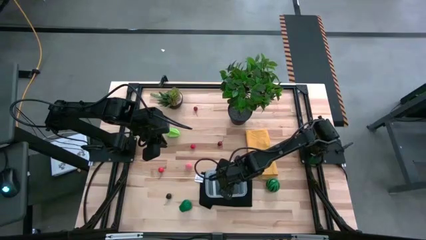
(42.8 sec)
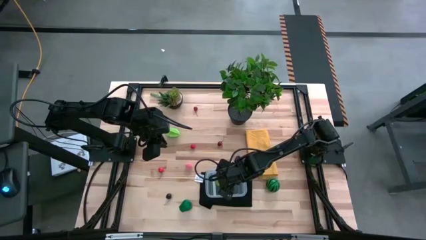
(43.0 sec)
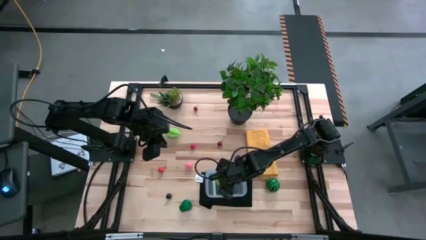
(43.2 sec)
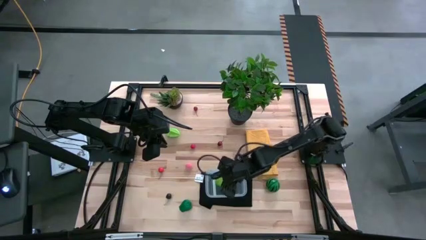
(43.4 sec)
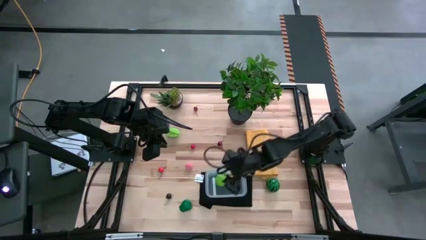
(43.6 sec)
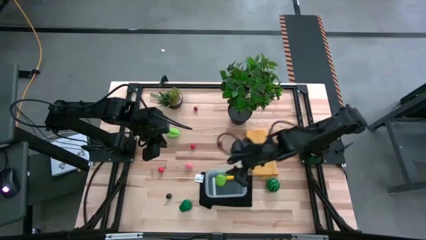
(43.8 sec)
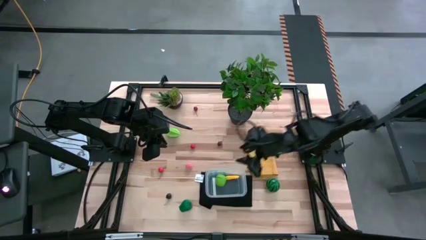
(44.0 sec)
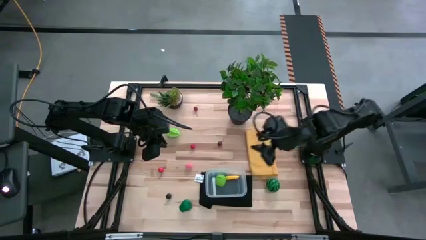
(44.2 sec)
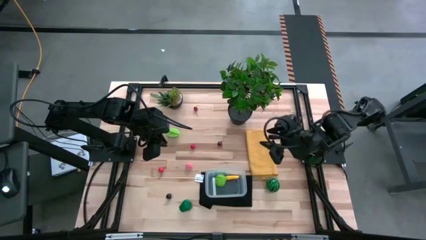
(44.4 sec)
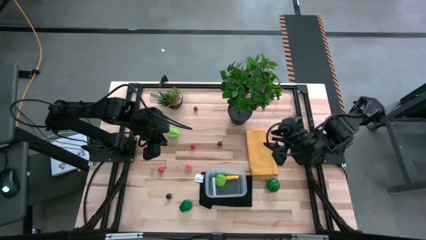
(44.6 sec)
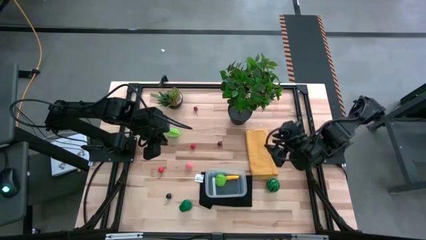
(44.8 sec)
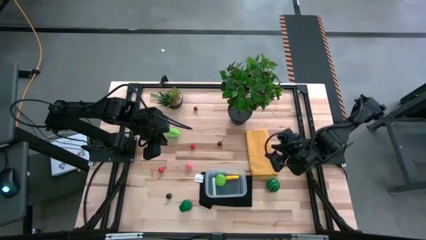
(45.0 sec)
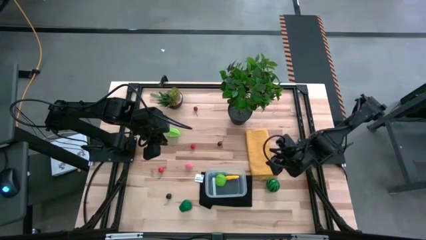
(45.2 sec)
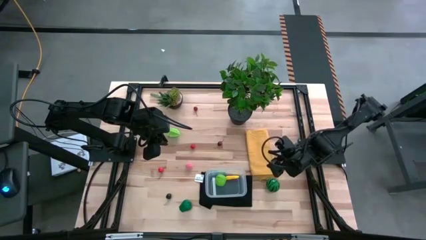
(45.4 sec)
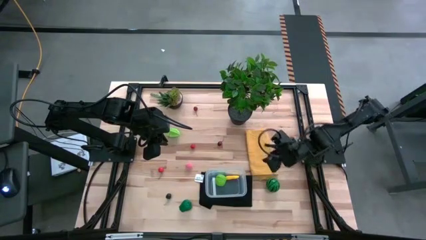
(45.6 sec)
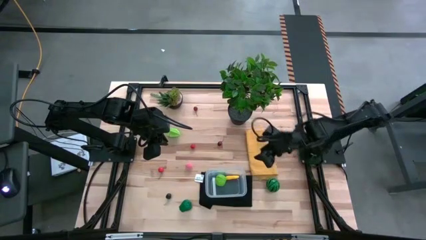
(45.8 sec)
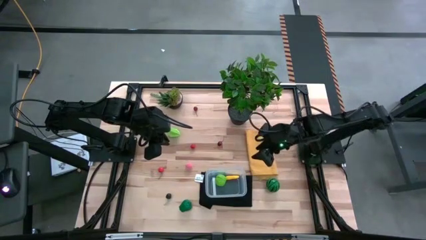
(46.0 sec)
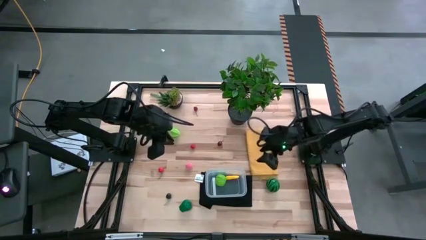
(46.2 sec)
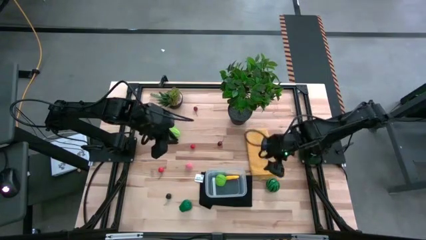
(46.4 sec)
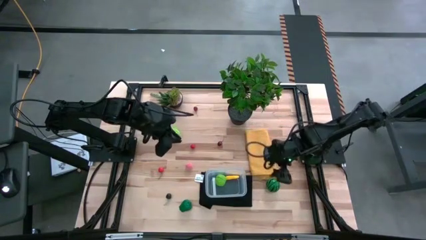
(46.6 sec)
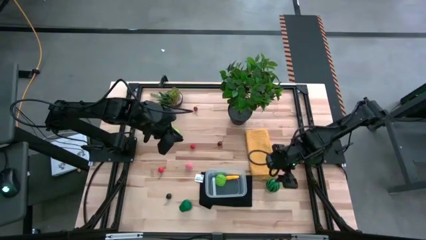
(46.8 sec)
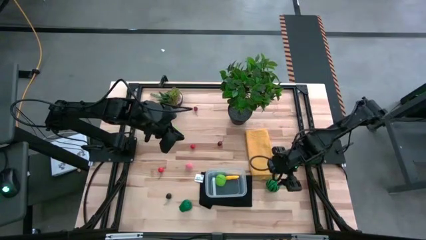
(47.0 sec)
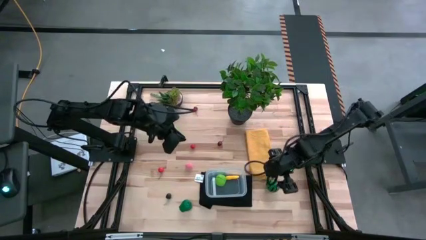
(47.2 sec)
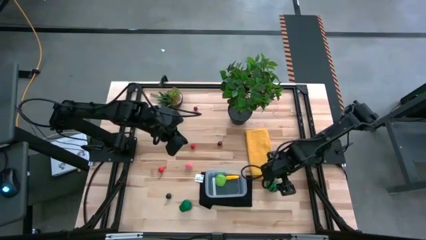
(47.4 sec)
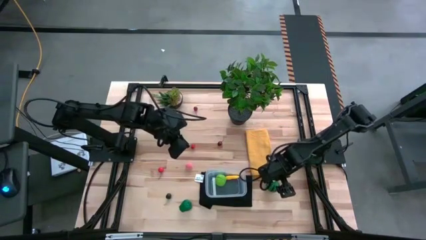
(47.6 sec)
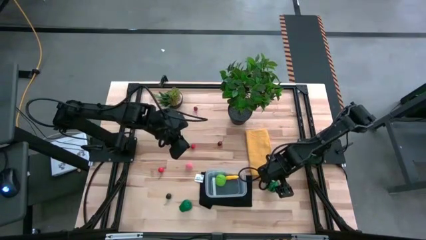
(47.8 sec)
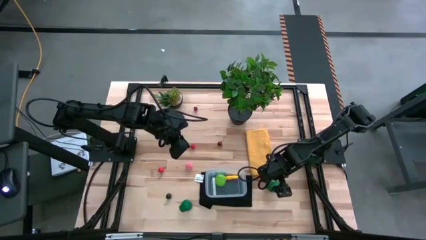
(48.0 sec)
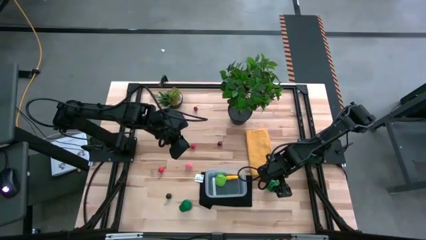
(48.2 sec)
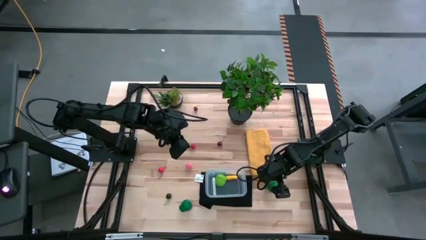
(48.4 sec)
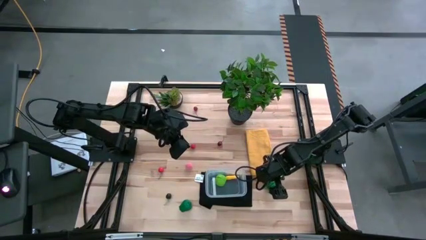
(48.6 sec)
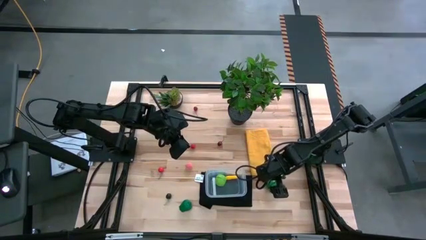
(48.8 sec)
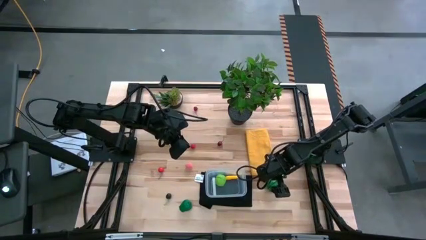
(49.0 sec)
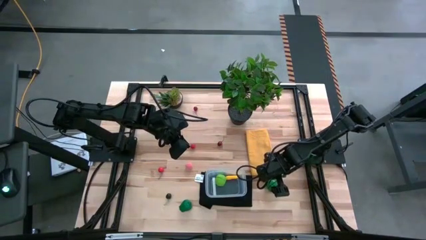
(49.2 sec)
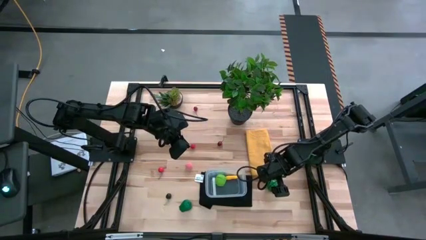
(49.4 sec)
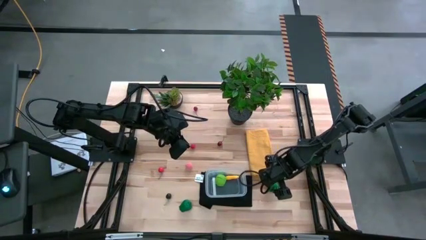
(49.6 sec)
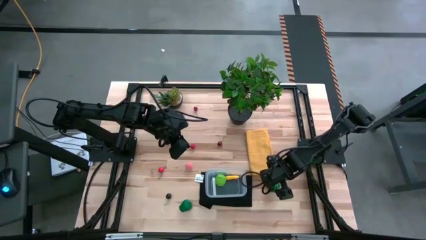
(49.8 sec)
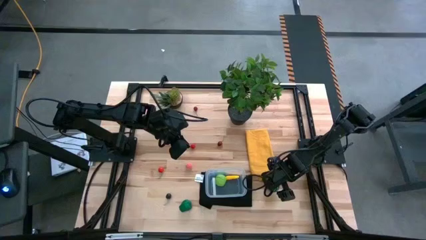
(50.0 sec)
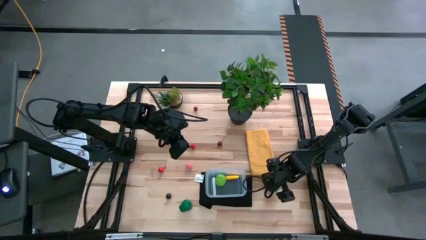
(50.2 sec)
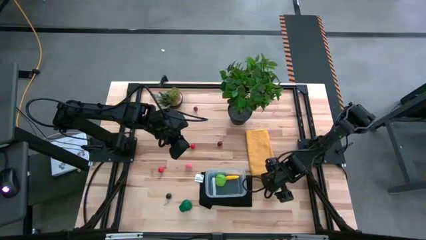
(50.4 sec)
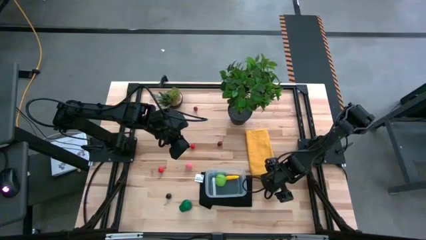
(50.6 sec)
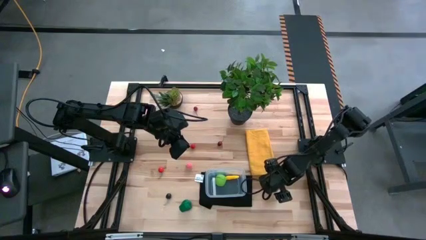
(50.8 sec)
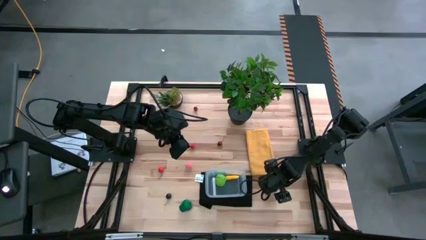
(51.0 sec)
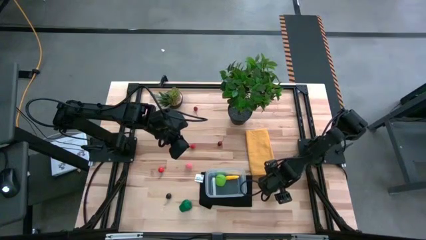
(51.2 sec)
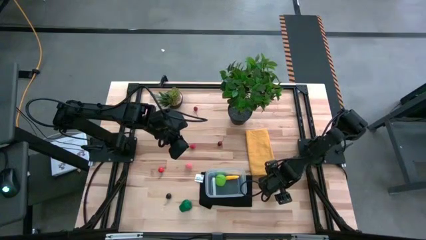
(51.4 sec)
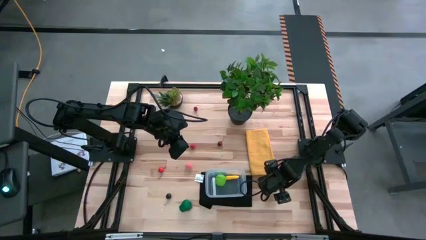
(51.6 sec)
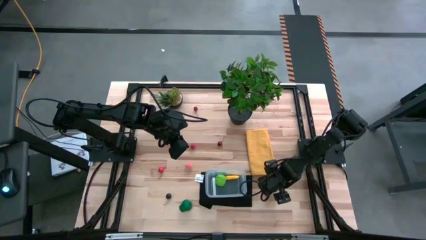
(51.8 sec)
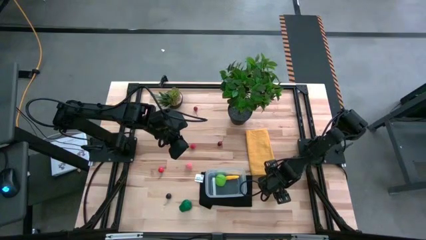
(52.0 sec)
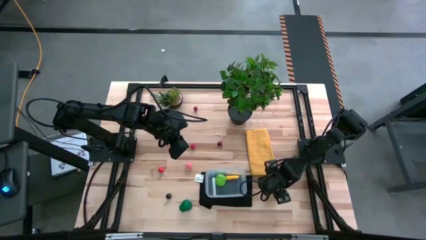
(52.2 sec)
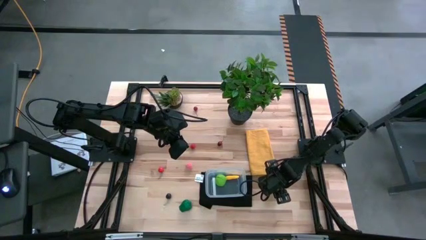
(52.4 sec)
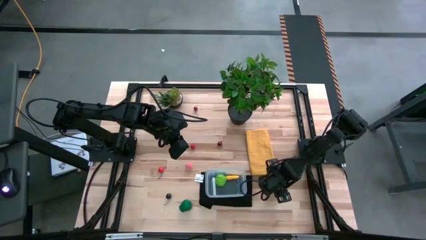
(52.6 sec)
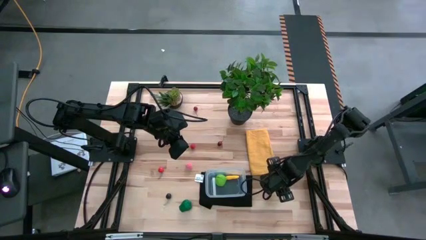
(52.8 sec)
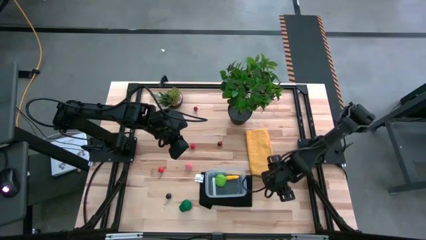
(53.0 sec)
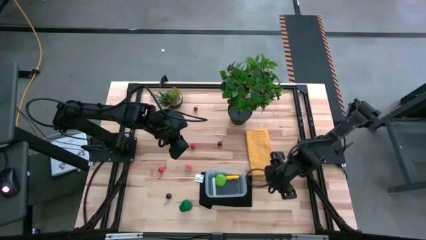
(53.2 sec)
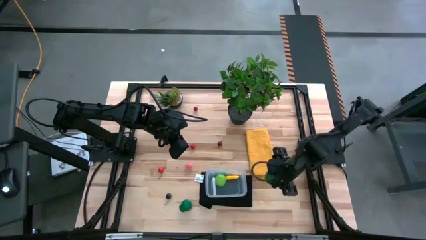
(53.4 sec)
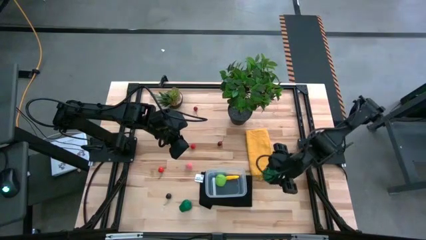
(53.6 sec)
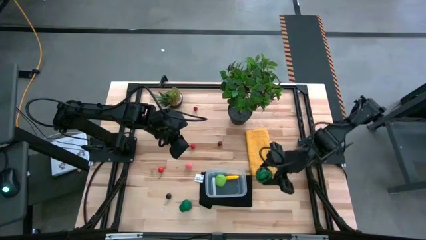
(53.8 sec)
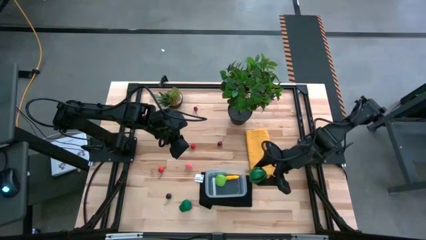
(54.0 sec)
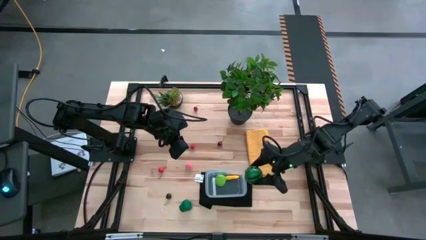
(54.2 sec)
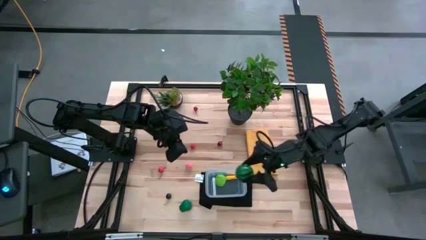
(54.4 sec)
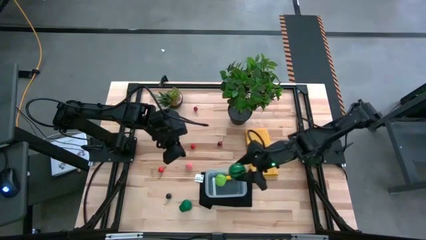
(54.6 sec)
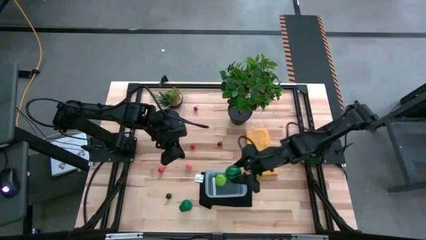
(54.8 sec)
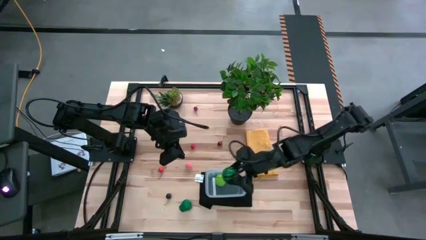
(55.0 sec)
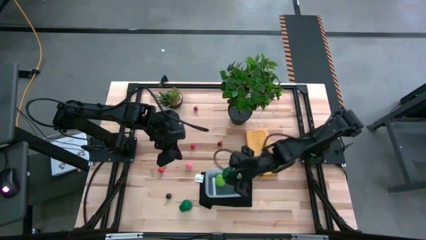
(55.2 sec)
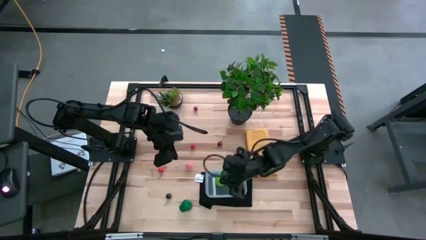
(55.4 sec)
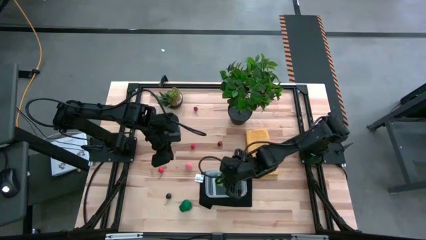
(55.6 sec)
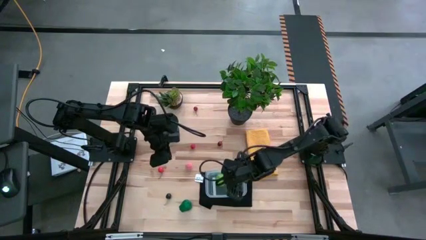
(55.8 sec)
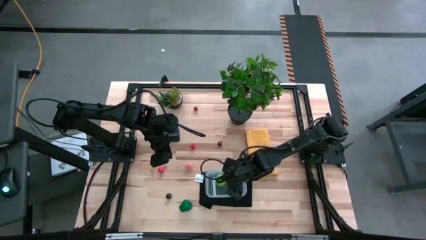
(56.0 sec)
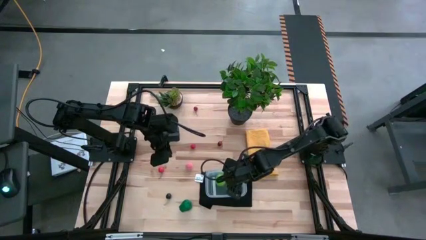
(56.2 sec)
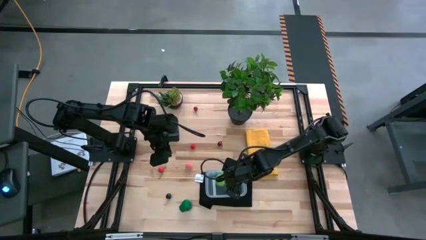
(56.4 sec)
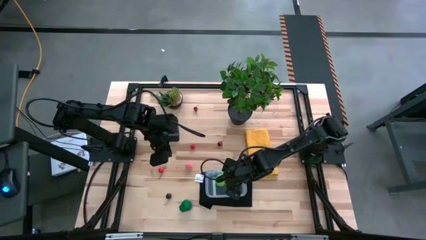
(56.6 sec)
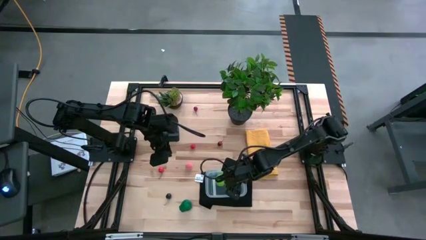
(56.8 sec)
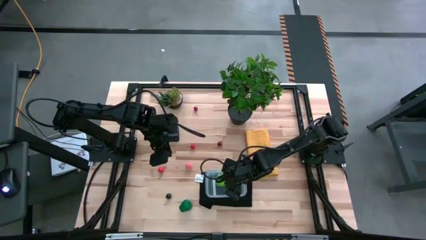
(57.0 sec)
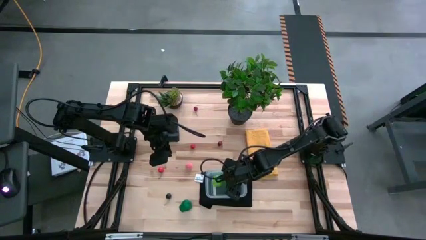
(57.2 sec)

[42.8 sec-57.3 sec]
Task: Pick and placing Produce into tupperware
Put the watermelon into the transparent bin
